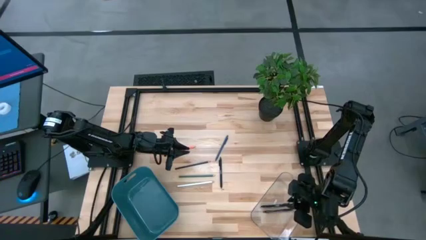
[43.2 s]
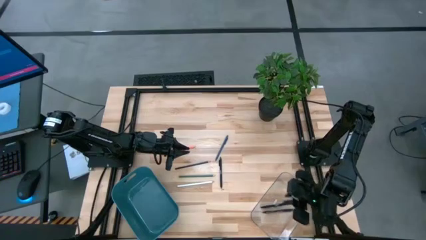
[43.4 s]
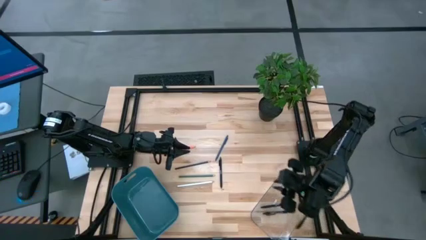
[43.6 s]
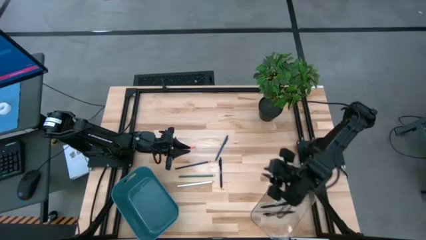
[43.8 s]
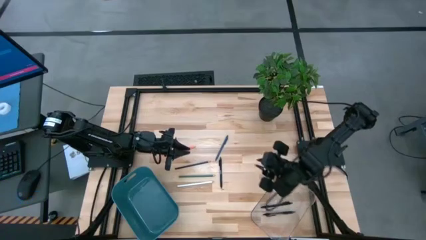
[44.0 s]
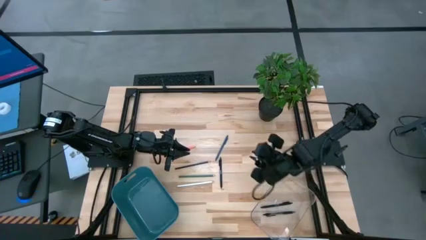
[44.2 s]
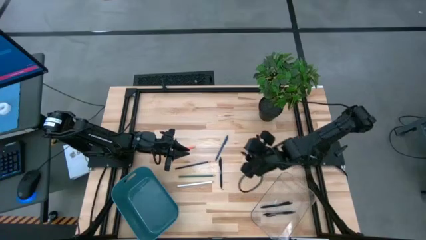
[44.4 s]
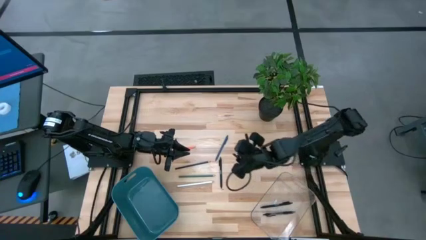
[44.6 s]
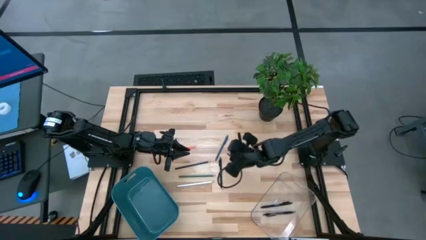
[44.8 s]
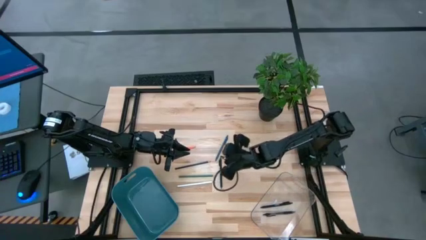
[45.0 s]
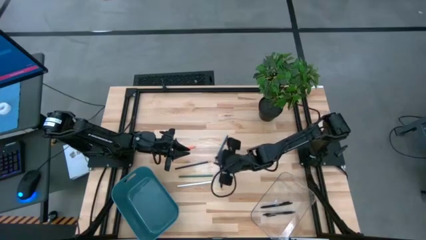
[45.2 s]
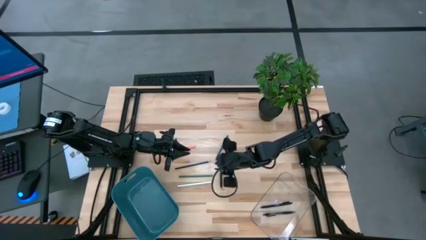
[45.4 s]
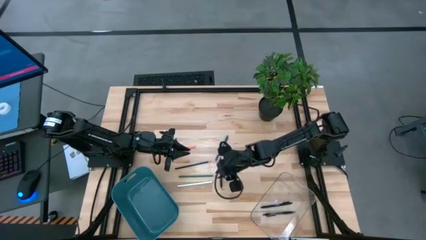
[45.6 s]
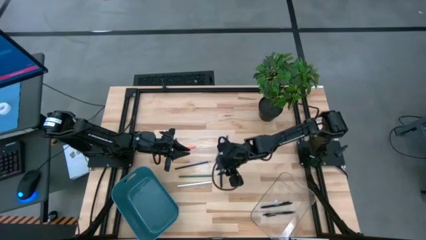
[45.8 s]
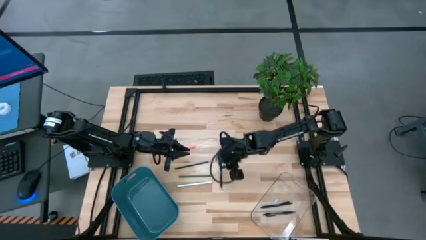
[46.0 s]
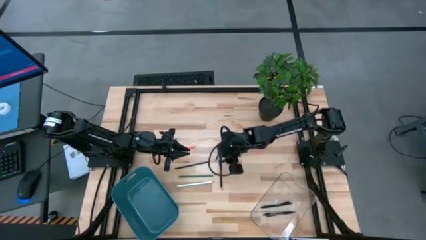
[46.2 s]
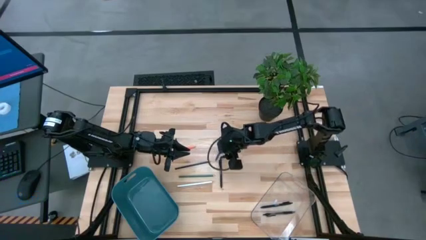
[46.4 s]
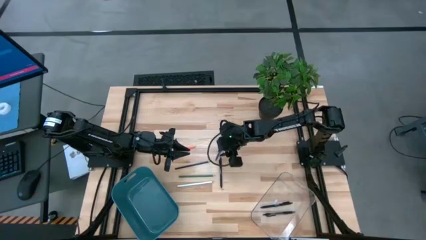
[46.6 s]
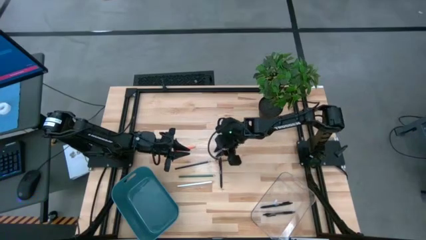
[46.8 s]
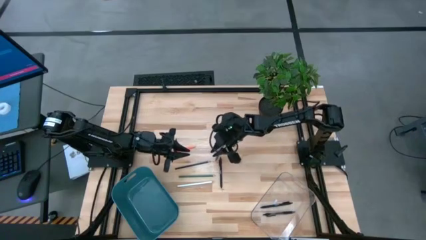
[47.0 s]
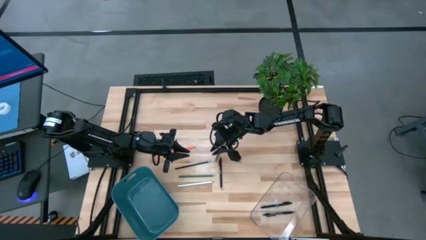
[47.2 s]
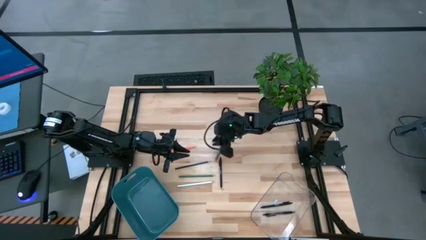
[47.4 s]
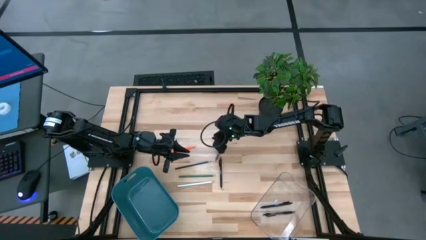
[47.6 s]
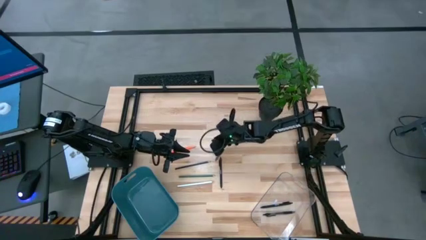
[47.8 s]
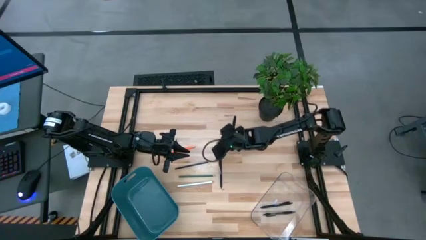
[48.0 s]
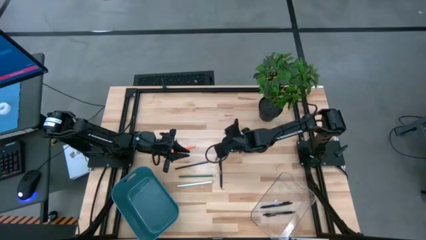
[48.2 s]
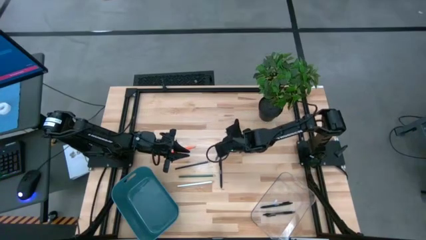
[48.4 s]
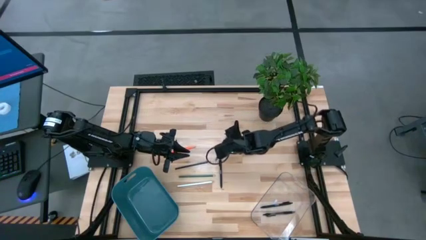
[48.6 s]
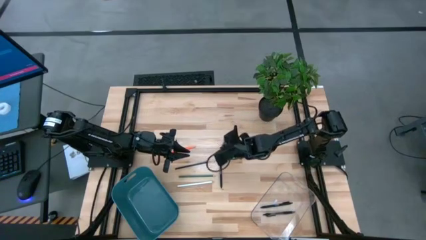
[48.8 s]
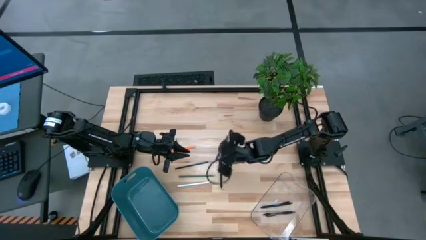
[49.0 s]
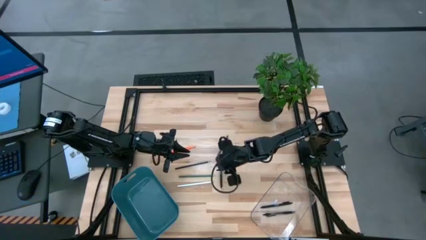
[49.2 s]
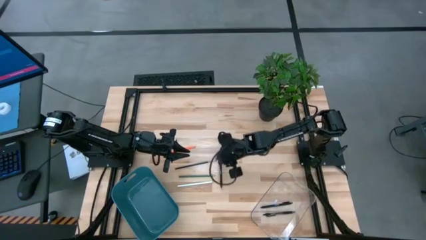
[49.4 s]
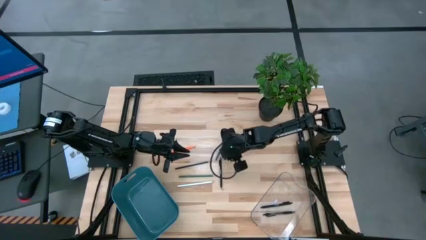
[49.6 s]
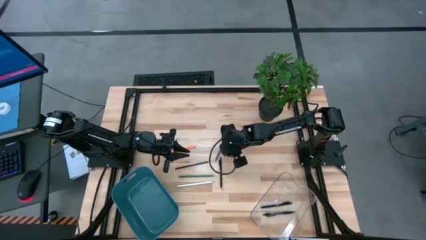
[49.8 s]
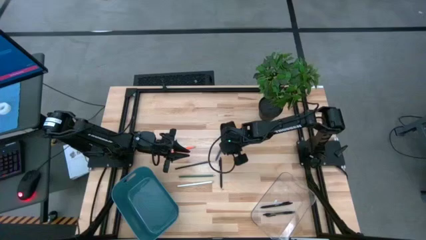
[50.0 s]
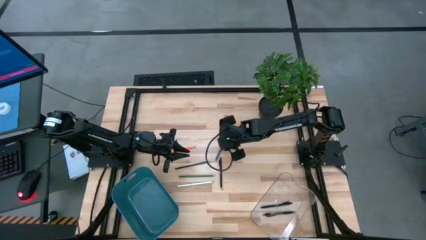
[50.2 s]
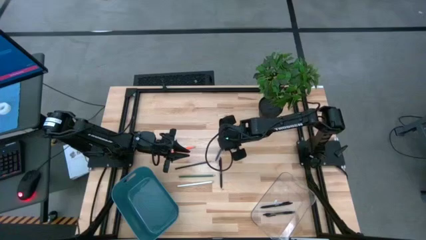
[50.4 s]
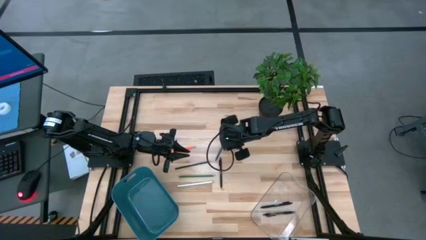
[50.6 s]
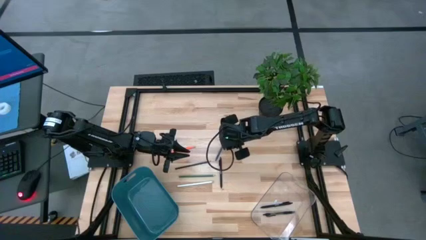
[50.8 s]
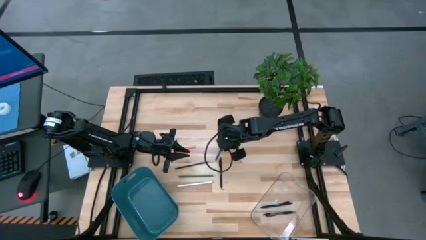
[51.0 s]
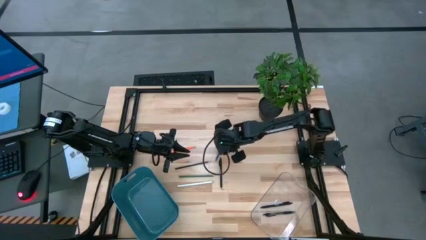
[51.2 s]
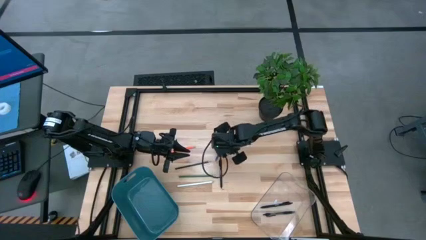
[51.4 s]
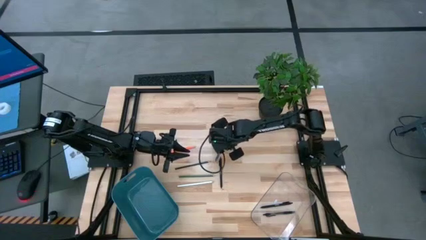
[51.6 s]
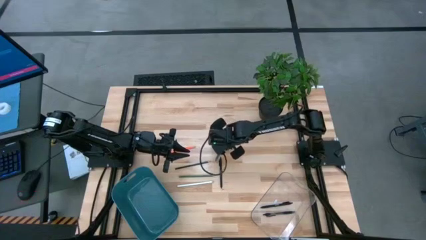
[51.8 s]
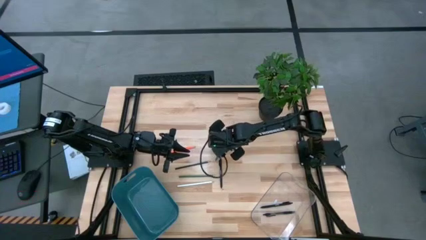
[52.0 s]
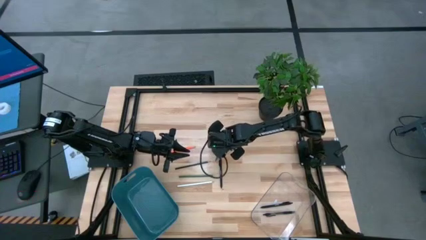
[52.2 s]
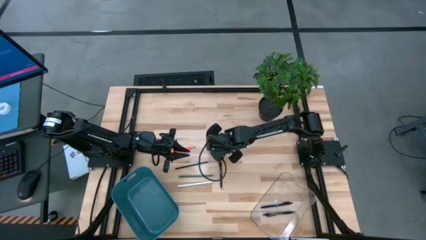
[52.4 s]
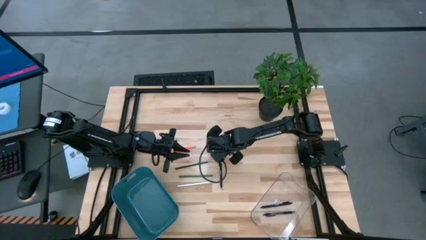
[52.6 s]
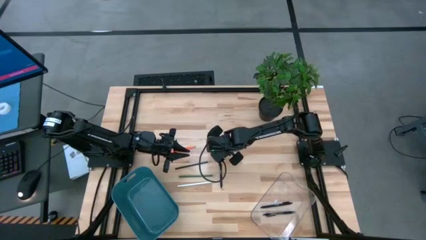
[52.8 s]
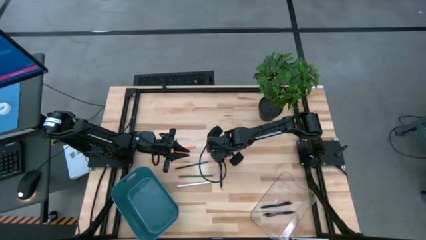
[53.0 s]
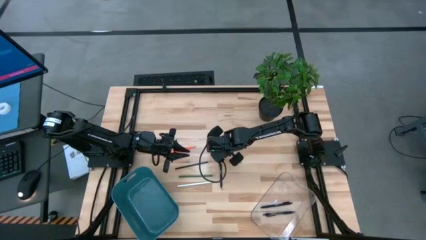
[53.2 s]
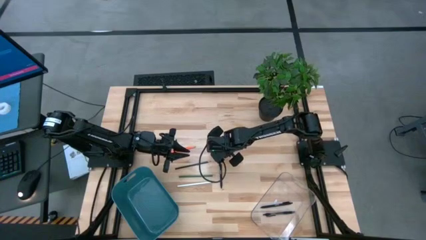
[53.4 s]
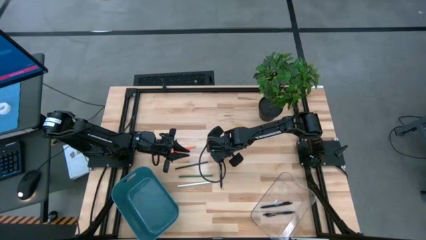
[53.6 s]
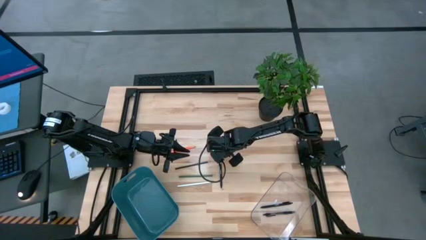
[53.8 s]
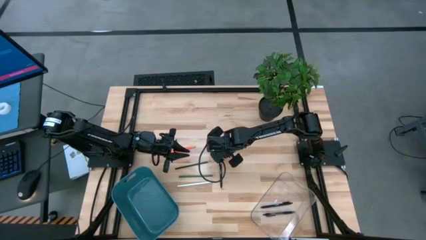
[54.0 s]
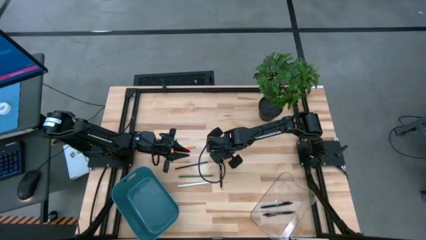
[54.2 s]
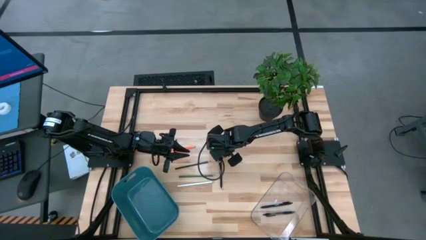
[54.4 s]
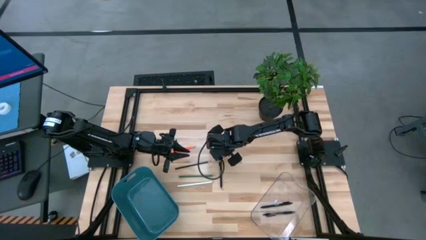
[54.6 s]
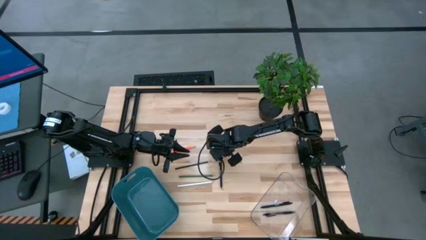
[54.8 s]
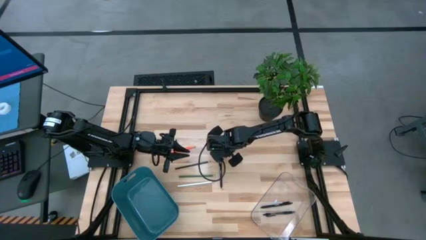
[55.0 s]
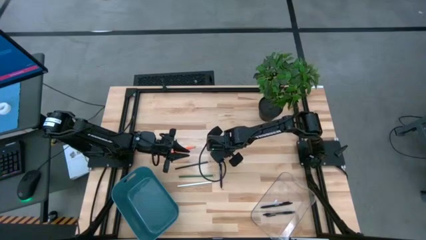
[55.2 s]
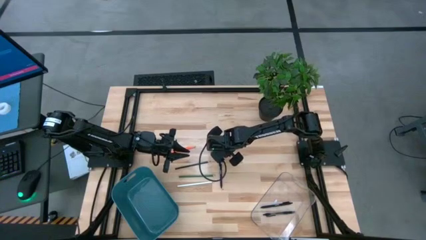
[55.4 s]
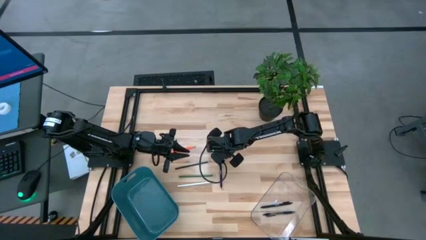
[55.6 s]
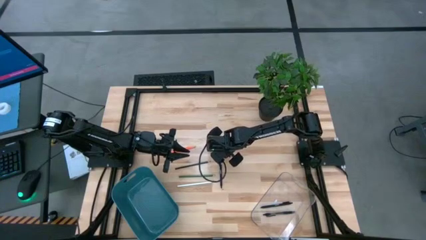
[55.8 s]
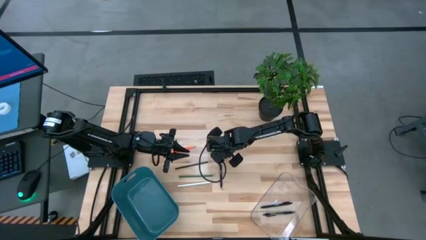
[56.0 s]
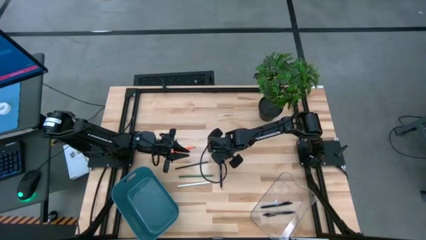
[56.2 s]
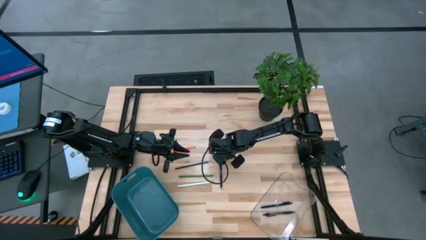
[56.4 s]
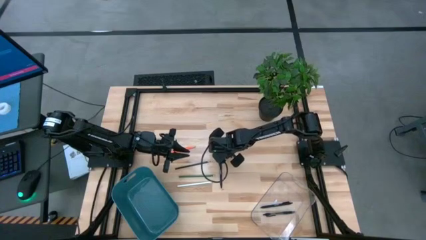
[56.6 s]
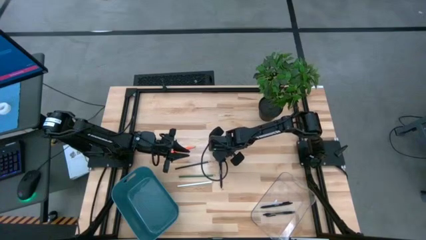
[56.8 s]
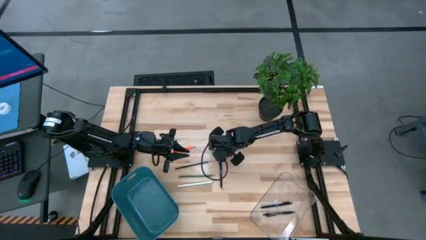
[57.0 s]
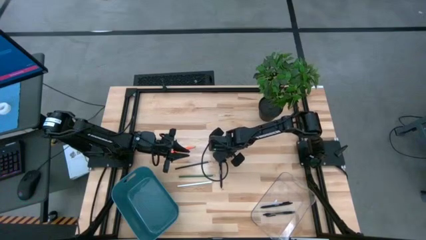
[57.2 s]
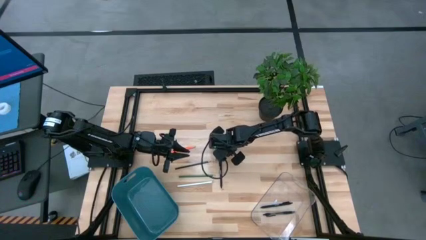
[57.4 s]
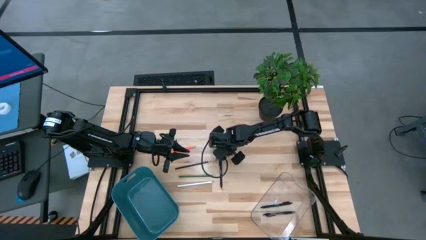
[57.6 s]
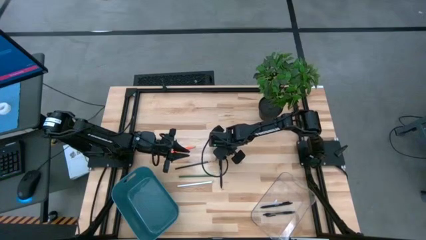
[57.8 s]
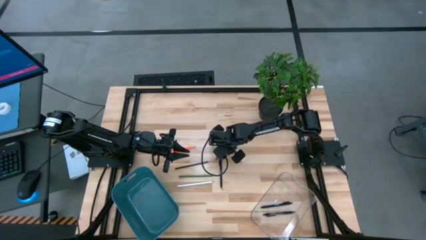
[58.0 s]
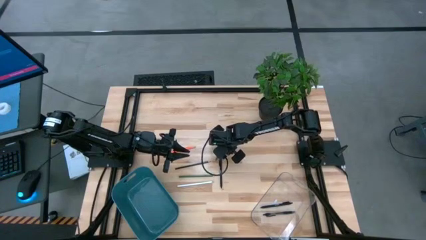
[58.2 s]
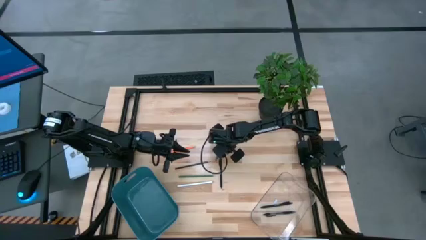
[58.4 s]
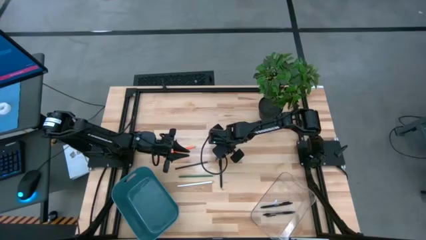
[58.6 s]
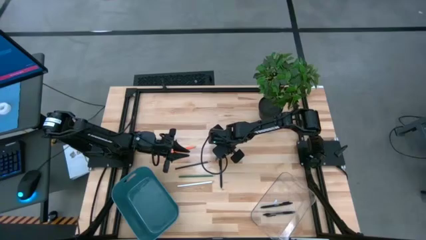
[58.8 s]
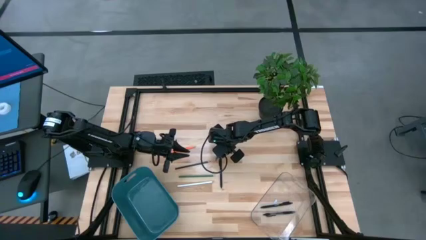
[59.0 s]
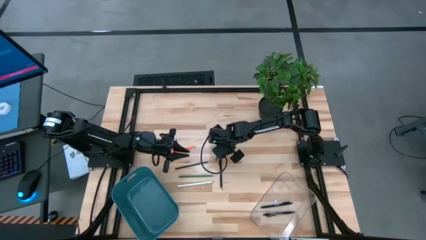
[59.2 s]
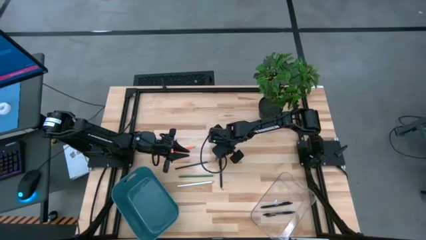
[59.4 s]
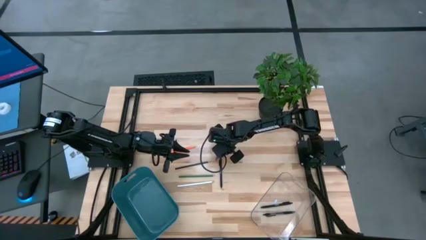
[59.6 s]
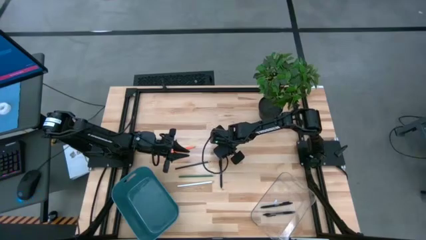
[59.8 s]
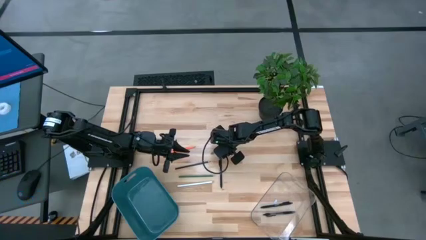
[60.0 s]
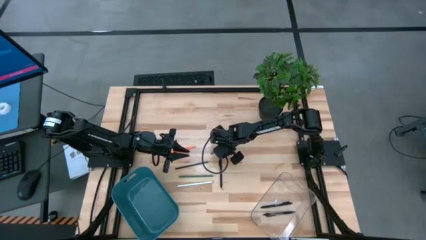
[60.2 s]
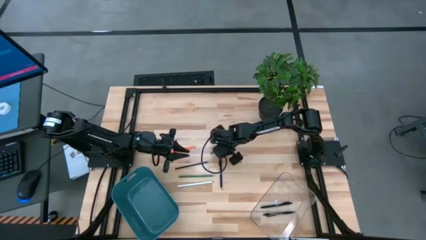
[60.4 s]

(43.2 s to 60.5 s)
Task: Sort pens & pencils
Put the blue pen in the transparent bin
